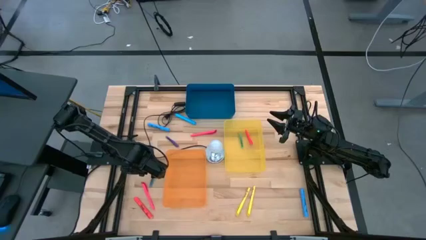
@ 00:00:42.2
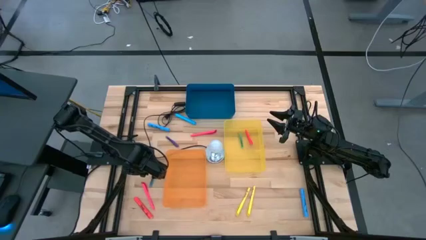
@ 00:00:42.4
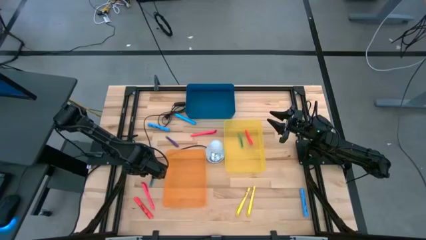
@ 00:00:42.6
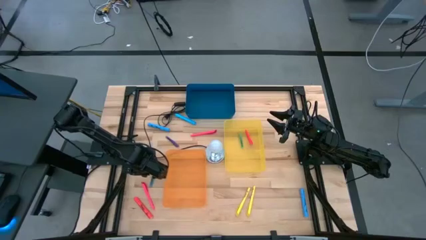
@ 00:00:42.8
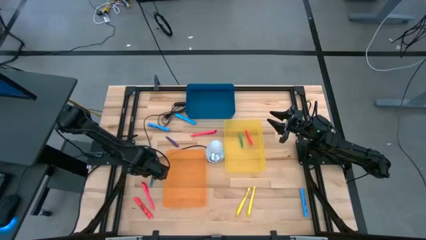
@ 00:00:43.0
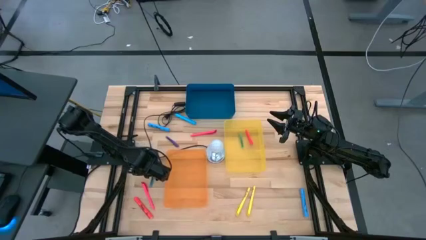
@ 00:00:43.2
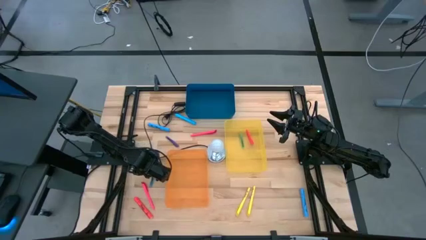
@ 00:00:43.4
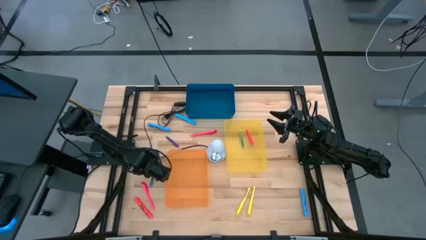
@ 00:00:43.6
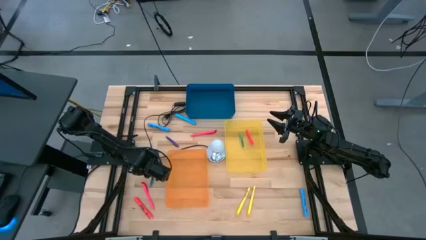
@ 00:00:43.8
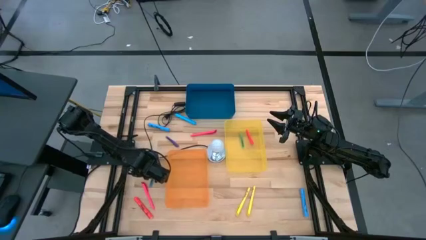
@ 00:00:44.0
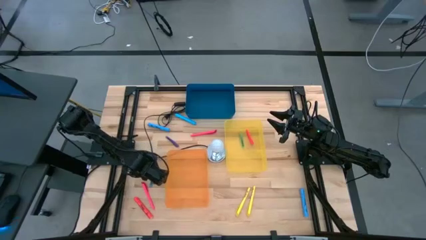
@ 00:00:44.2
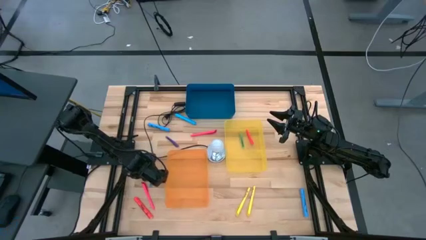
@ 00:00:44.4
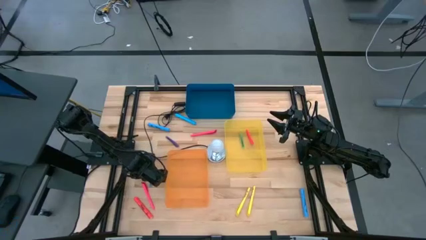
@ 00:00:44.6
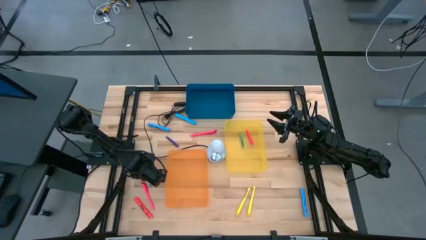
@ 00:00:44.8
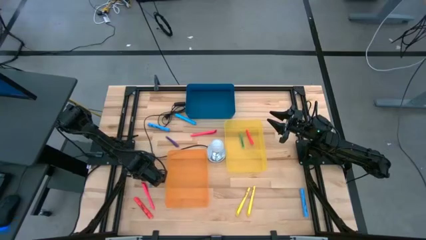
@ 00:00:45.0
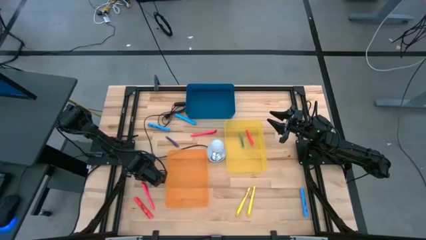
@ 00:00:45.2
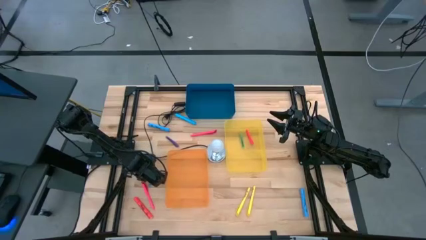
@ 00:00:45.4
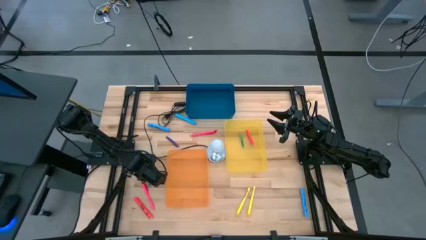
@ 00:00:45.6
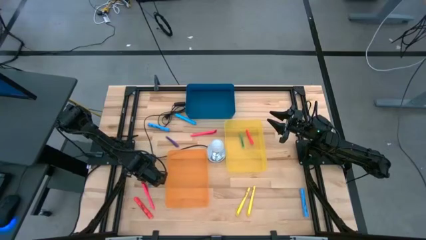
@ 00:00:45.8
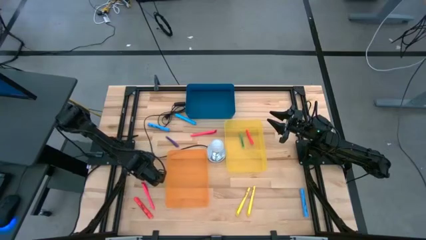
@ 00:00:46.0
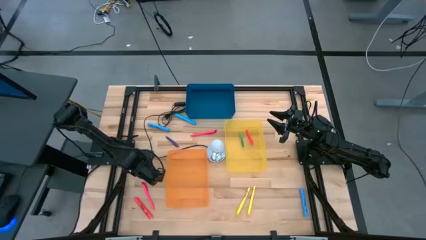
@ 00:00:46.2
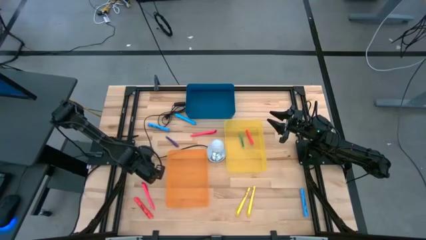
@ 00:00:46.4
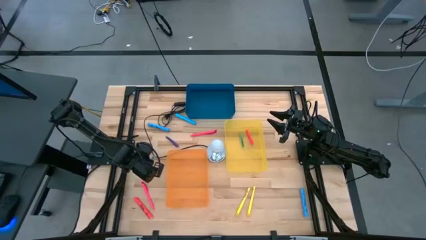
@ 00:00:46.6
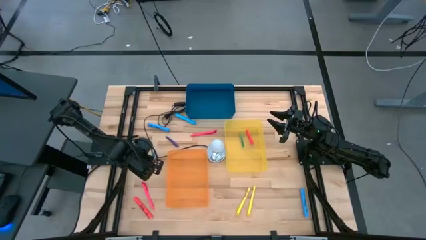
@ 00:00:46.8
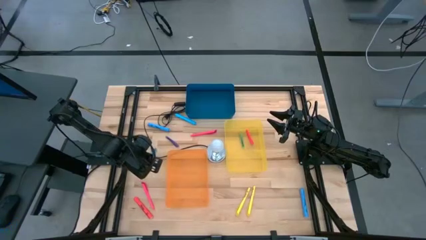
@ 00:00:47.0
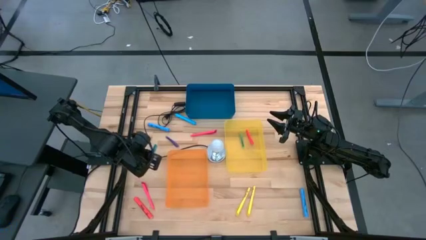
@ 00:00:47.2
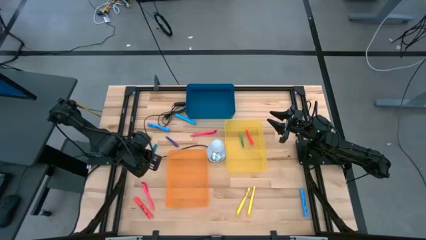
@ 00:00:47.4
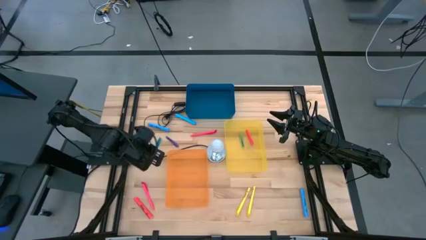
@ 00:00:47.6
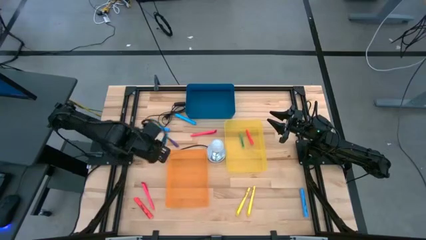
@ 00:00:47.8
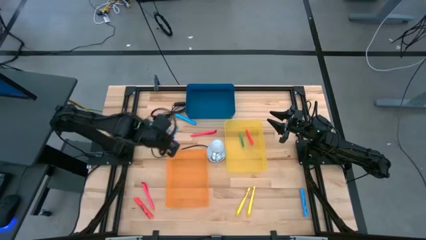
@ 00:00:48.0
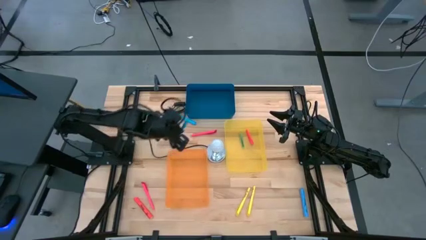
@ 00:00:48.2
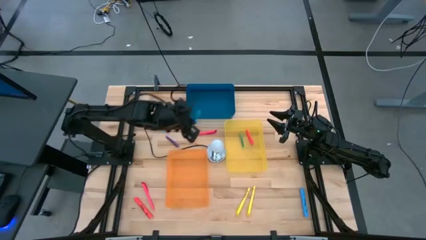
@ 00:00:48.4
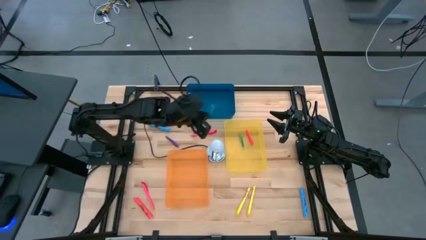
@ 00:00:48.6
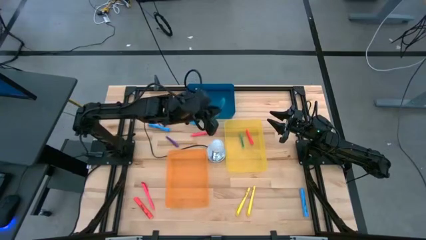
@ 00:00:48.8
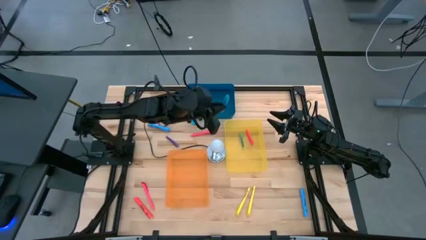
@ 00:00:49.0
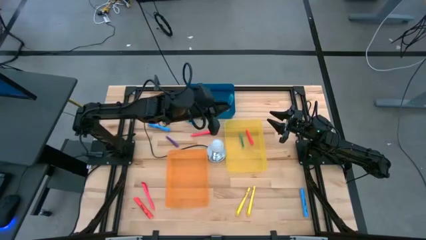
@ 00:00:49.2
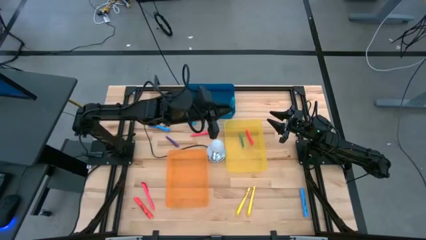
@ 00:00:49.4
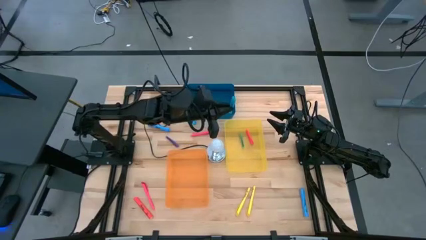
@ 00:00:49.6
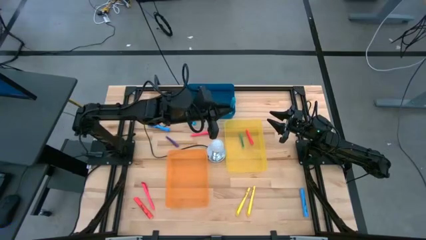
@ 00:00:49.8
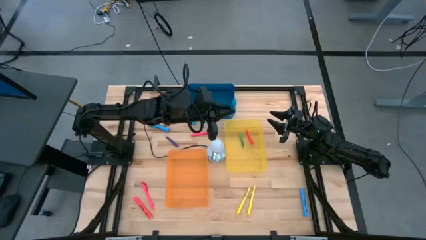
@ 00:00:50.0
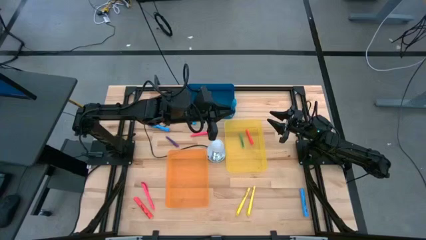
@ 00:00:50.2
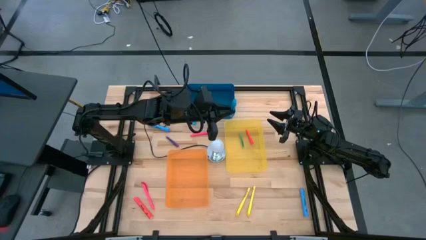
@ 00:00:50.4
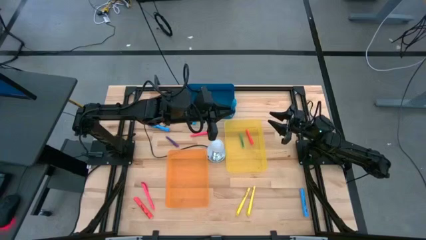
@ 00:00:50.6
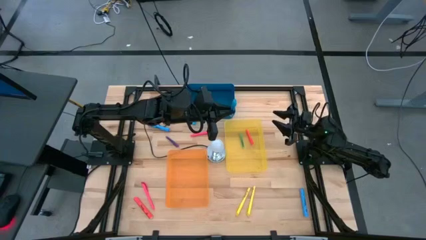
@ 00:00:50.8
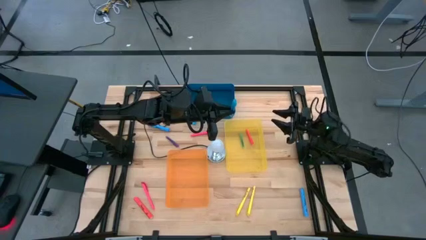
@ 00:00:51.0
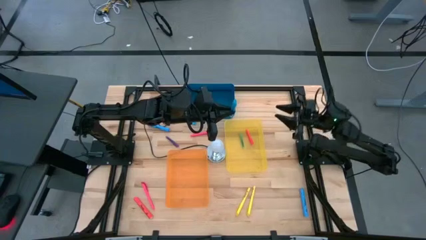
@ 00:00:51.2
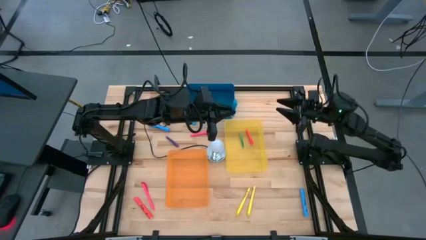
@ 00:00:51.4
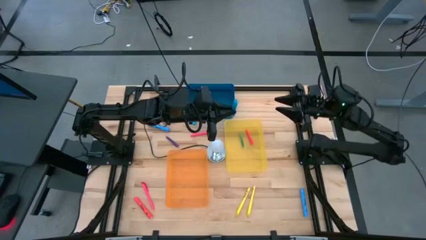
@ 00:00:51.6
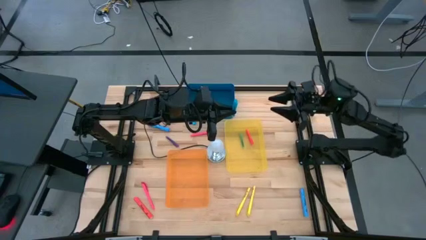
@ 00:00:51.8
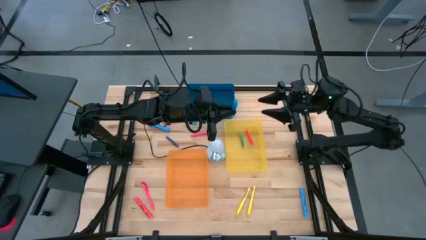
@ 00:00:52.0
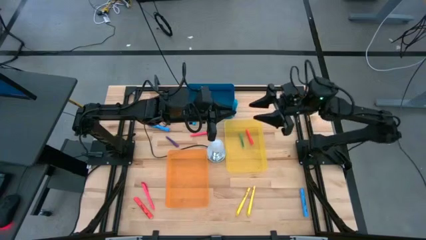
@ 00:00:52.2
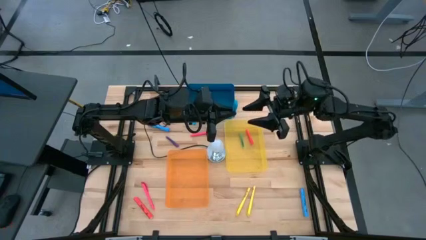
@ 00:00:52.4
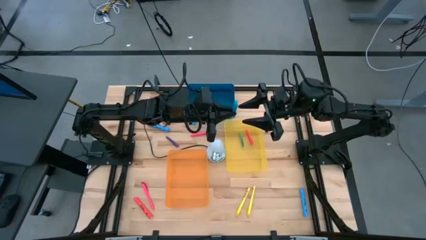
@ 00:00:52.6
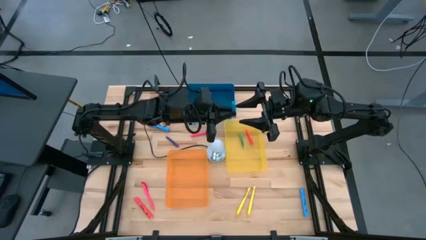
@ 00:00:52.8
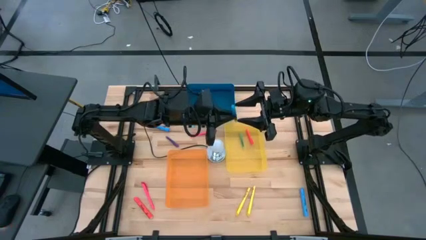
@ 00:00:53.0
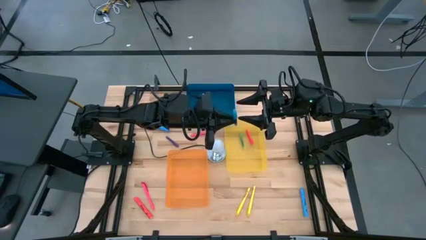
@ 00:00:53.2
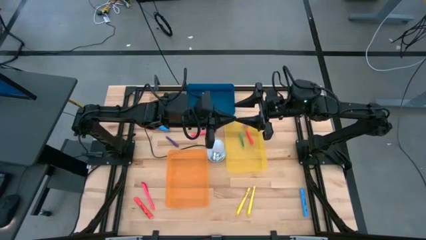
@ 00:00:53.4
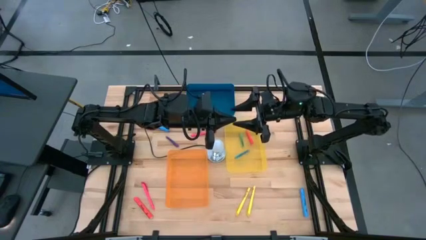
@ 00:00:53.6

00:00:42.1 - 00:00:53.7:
Task: Pick & Place Markers
Put the small blue pen into the yellow bin
